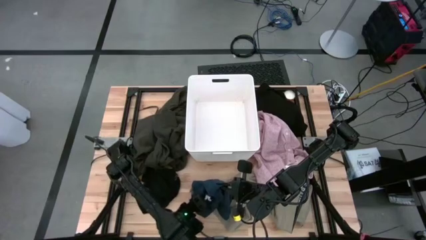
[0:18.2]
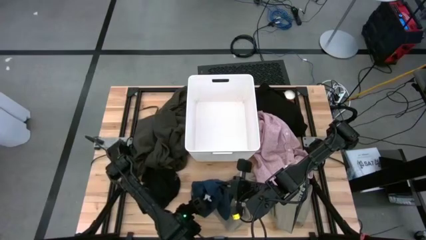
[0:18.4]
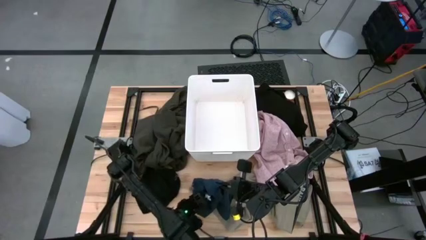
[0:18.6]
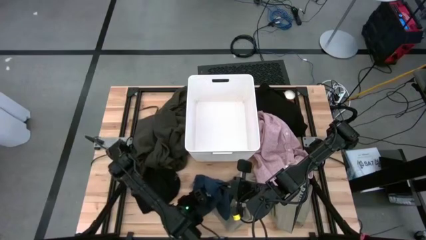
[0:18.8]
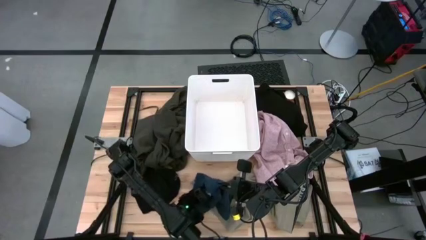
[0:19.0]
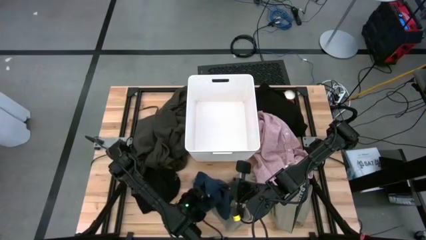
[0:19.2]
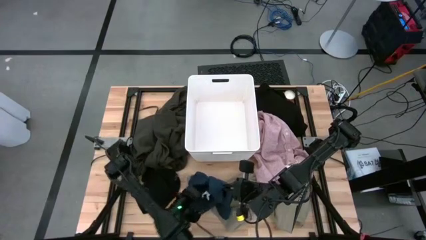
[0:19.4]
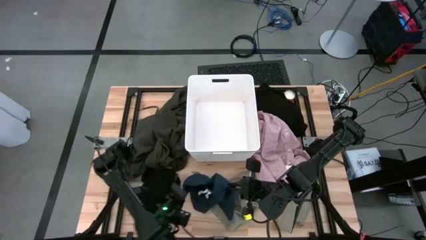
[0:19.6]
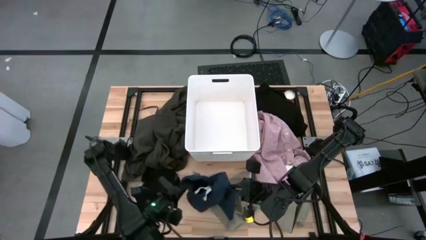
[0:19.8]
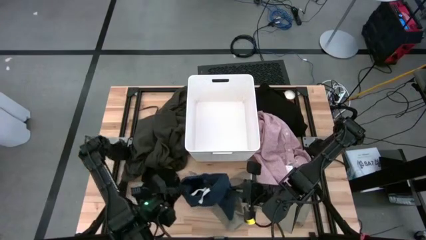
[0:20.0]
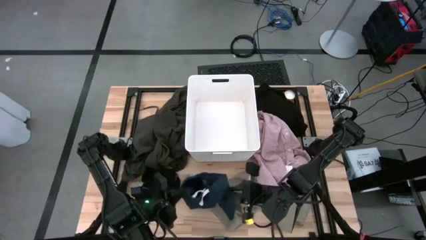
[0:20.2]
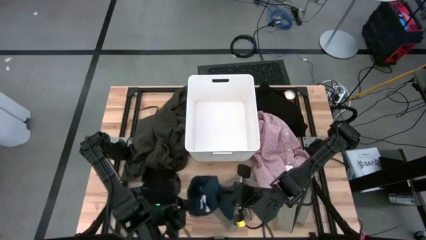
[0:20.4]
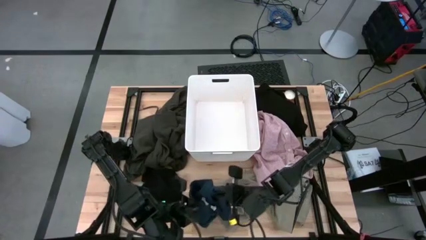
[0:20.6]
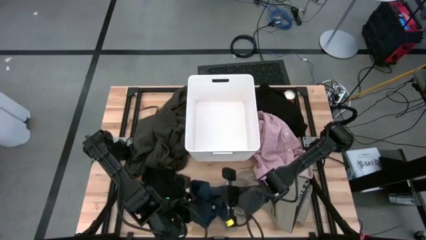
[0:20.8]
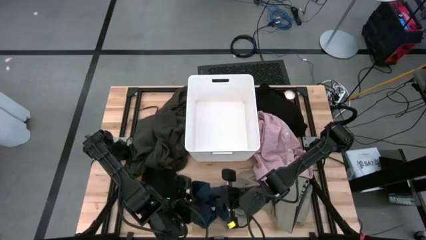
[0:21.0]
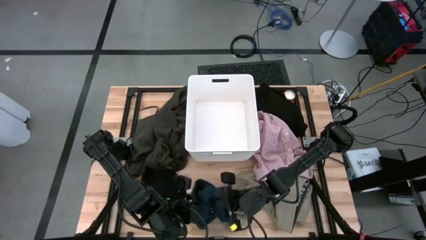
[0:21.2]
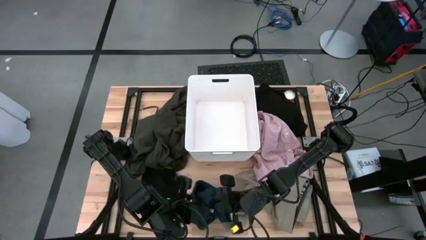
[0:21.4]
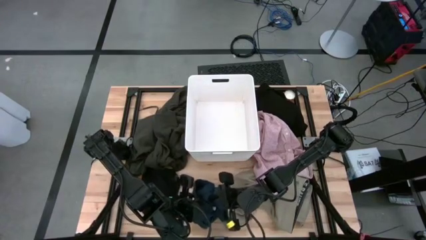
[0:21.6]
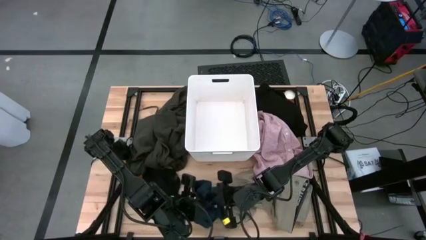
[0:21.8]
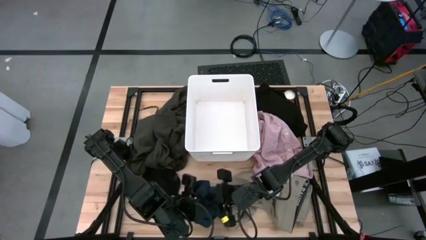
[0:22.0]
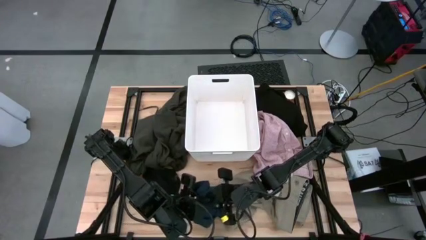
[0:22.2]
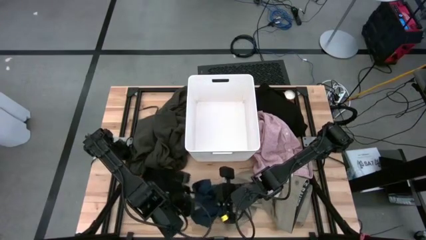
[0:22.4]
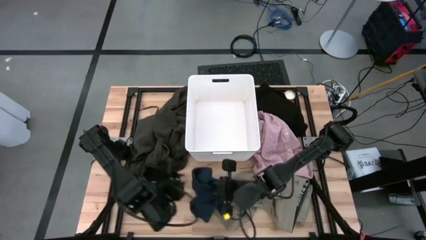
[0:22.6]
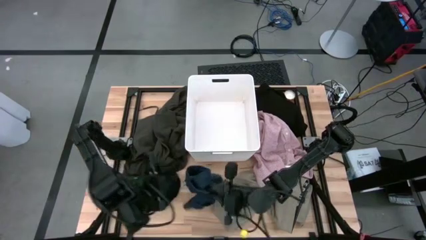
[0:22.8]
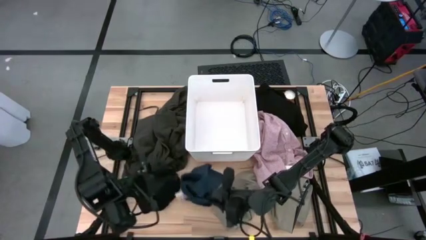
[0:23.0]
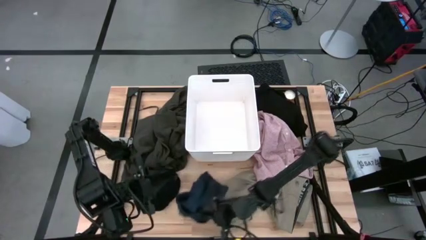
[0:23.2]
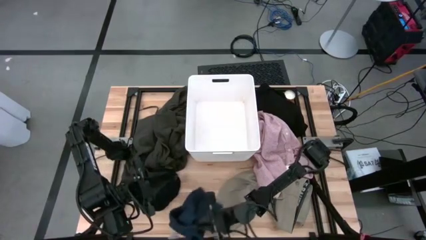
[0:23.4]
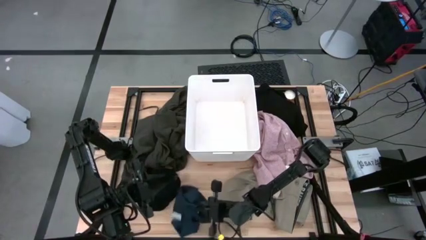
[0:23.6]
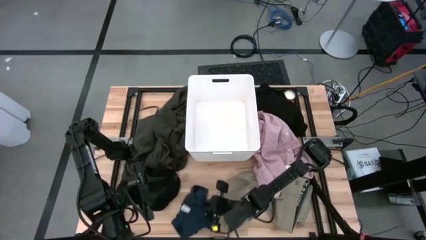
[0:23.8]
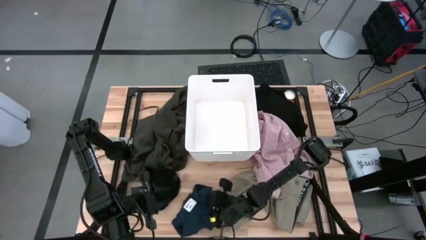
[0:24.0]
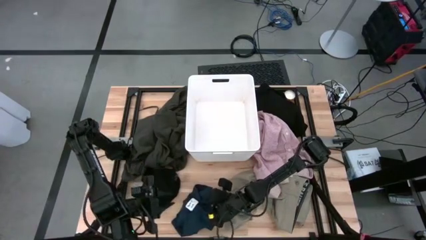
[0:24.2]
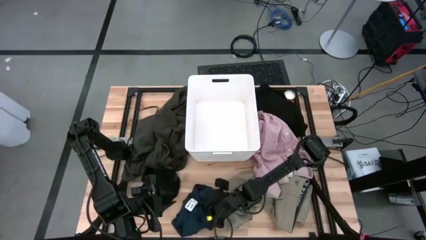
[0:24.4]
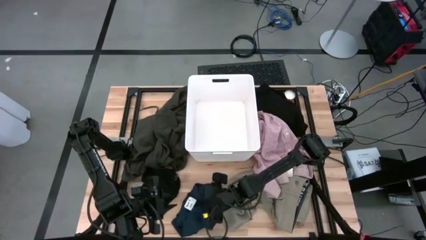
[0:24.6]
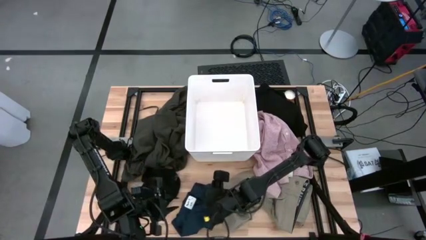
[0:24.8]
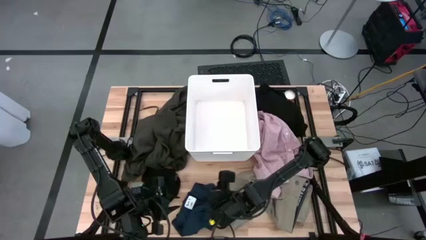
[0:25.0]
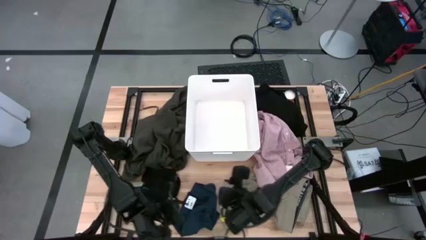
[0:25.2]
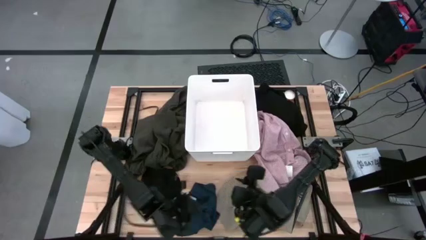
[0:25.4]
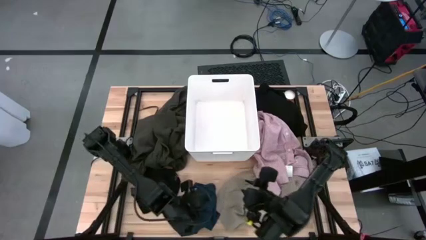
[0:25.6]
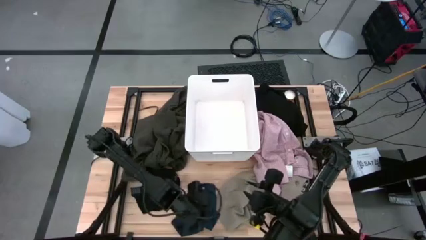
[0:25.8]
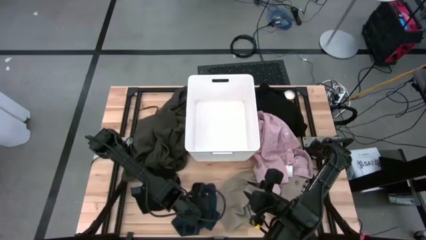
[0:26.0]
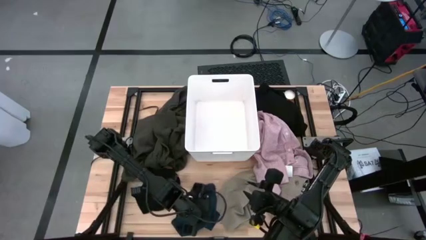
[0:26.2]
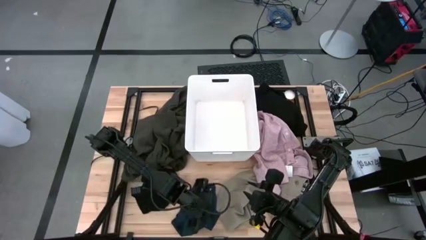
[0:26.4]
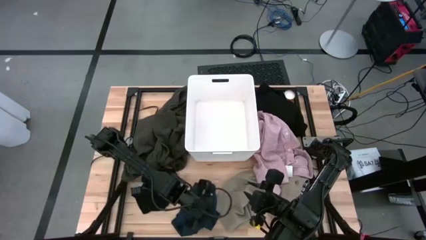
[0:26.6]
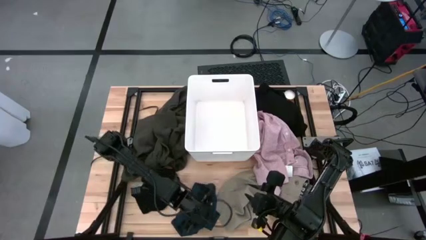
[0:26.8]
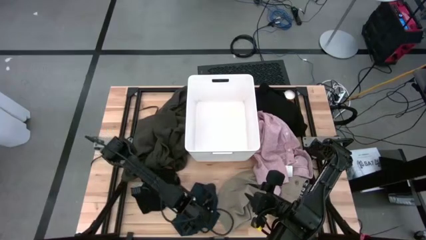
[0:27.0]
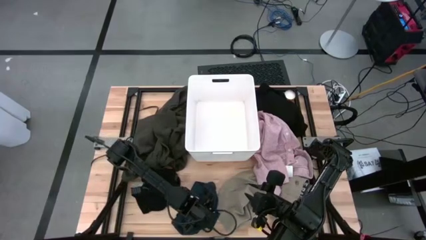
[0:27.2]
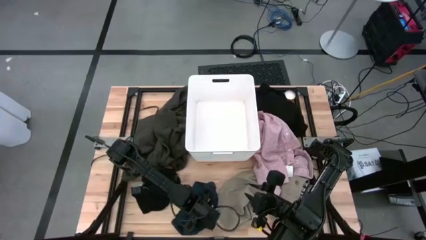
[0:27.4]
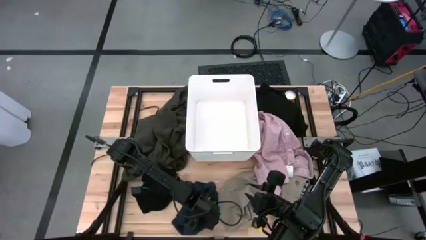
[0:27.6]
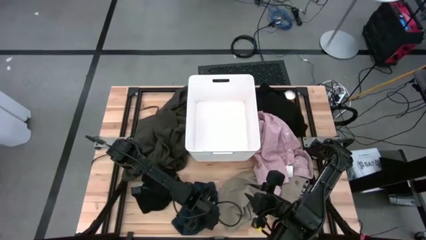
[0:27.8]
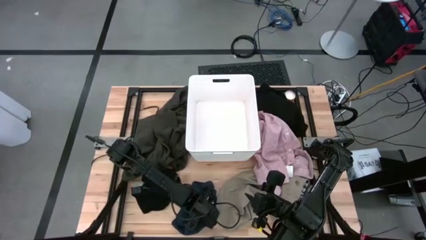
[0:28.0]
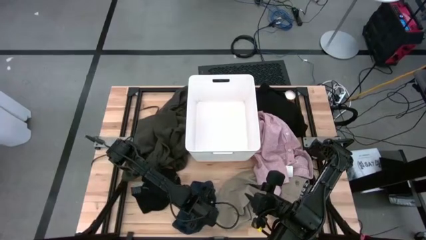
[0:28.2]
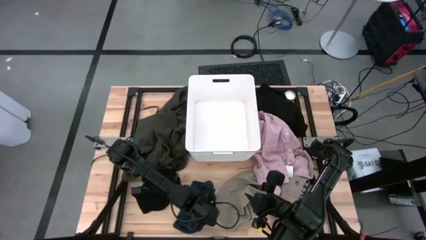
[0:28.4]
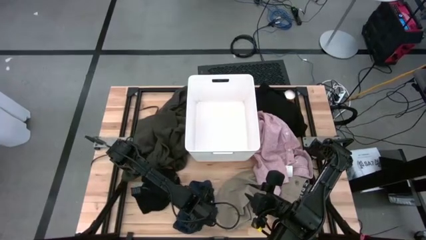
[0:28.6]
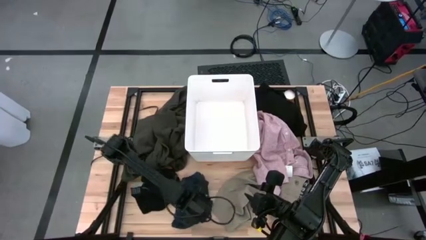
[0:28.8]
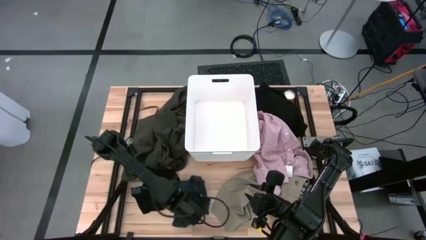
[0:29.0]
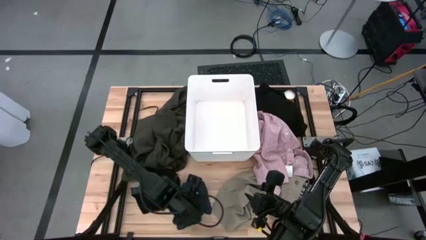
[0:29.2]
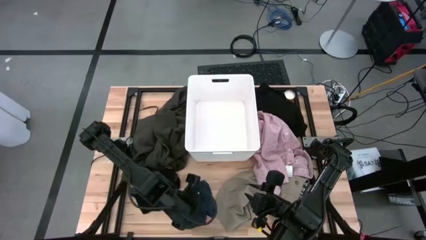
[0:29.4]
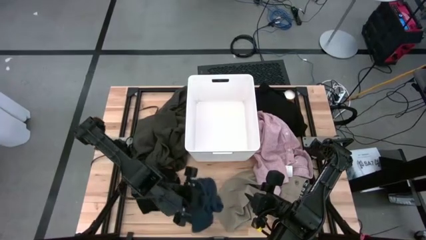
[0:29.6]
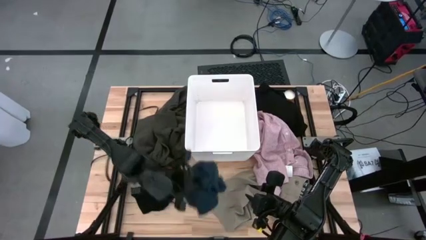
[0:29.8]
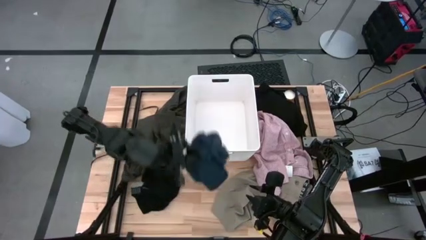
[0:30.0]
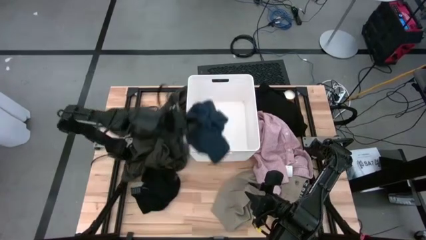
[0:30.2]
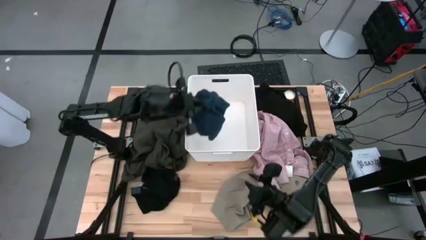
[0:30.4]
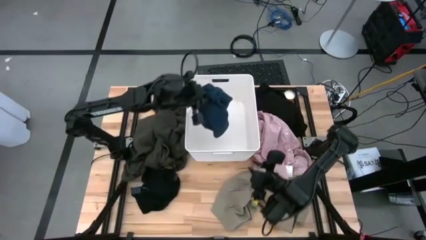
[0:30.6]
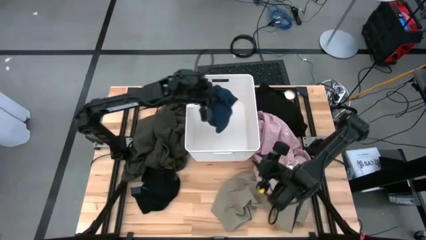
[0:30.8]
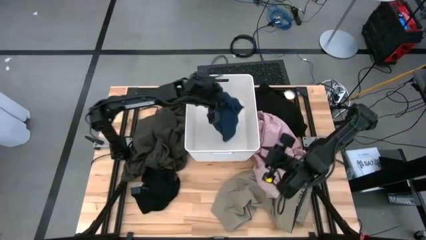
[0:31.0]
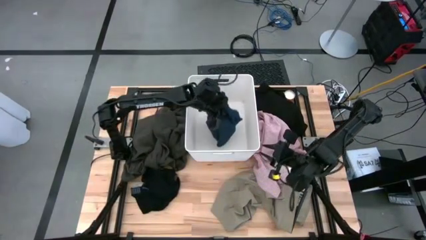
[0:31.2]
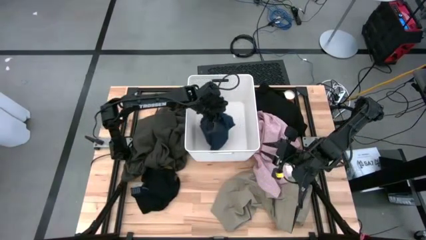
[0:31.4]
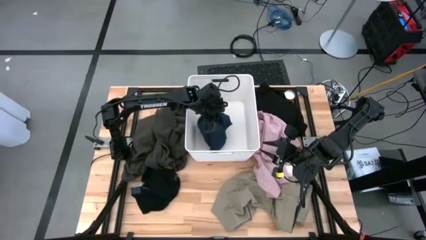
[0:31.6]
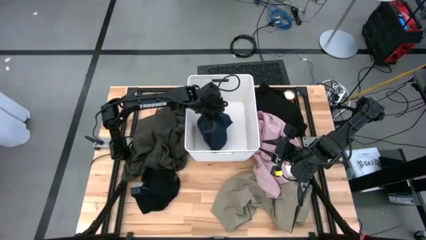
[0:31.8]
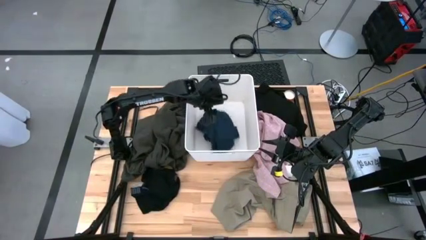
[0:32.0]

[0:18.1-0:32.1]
Task: Sort clothes
Put the blue shorts into the white laundry bin
